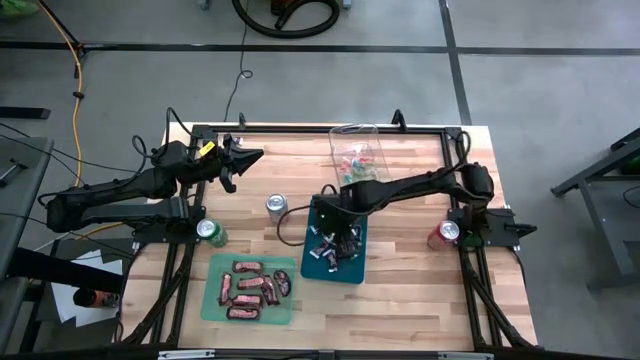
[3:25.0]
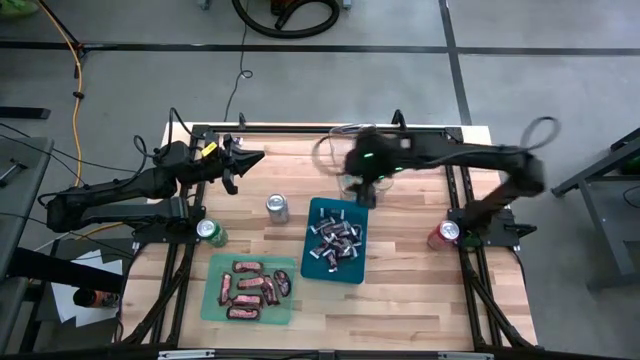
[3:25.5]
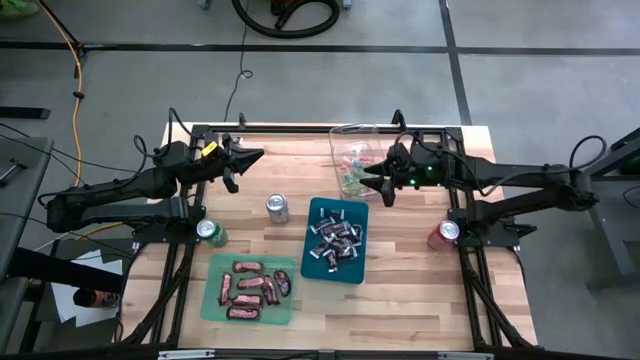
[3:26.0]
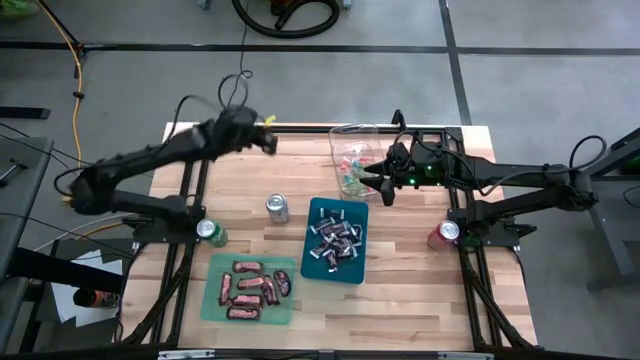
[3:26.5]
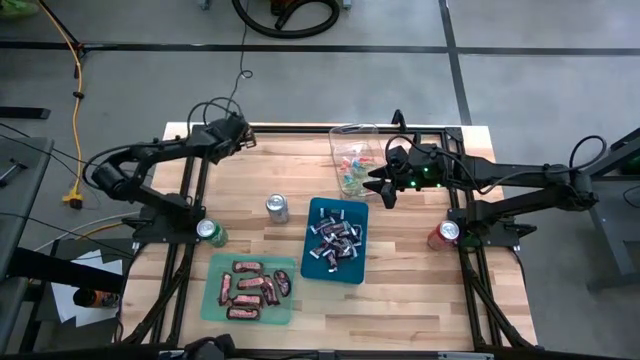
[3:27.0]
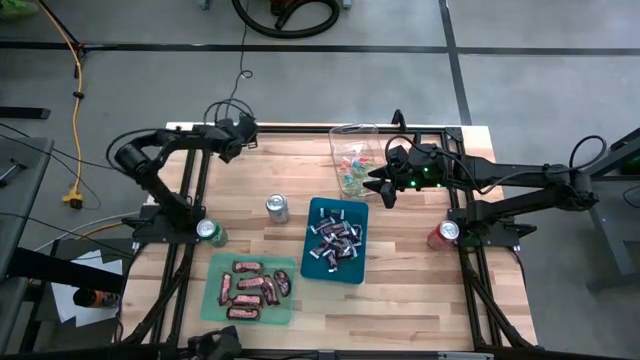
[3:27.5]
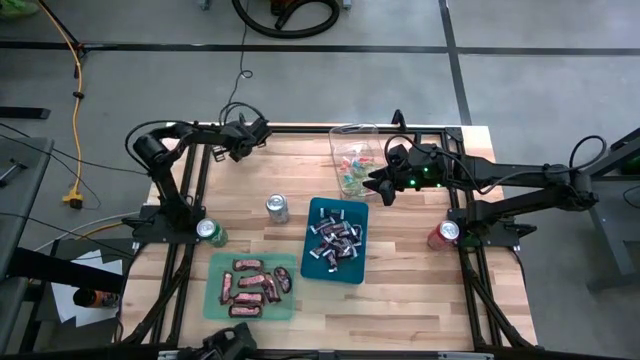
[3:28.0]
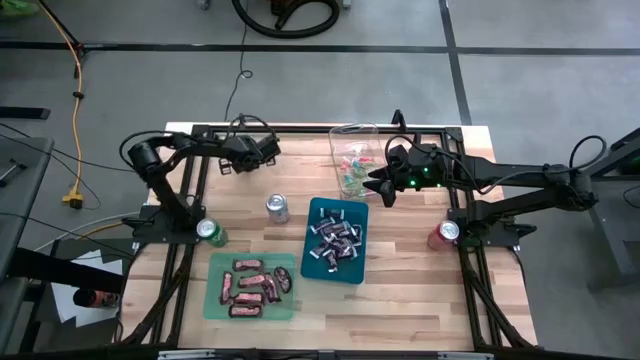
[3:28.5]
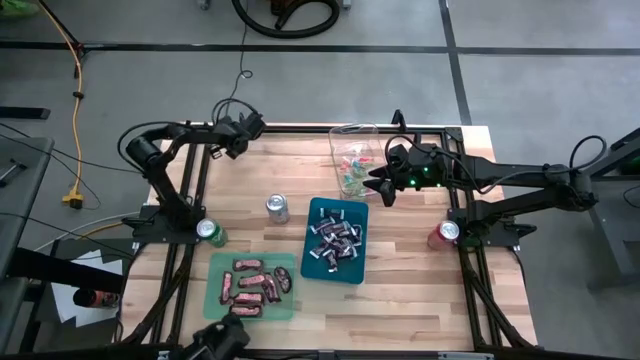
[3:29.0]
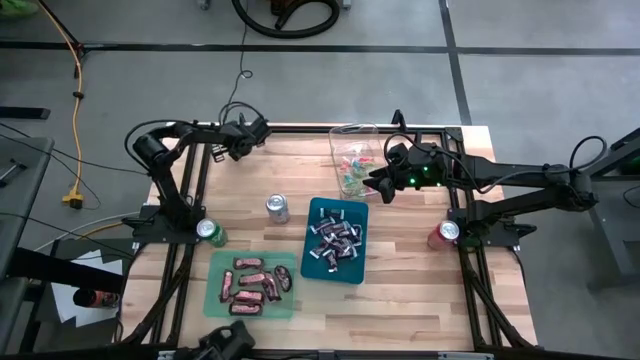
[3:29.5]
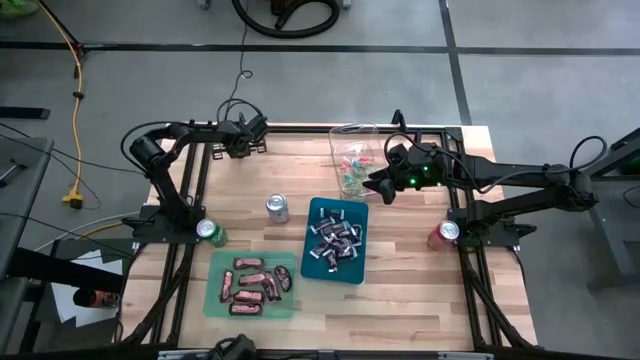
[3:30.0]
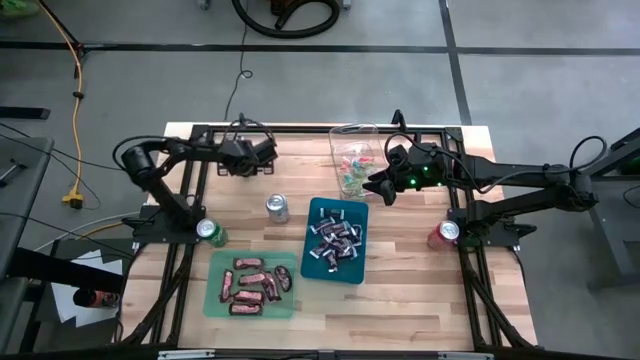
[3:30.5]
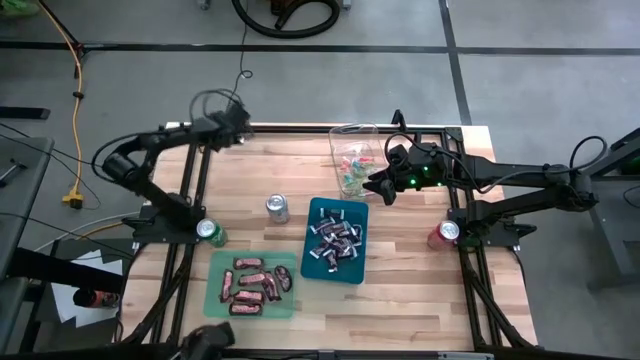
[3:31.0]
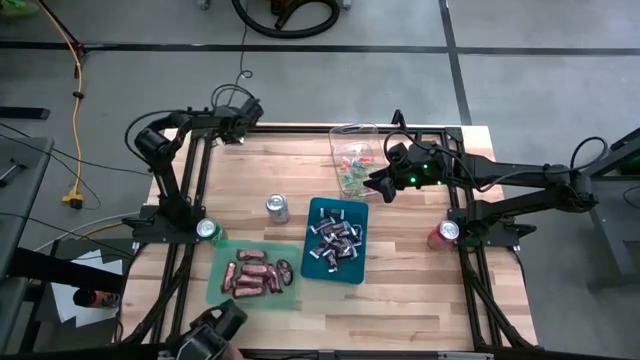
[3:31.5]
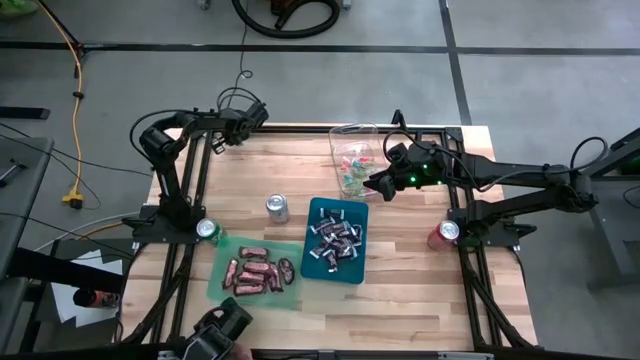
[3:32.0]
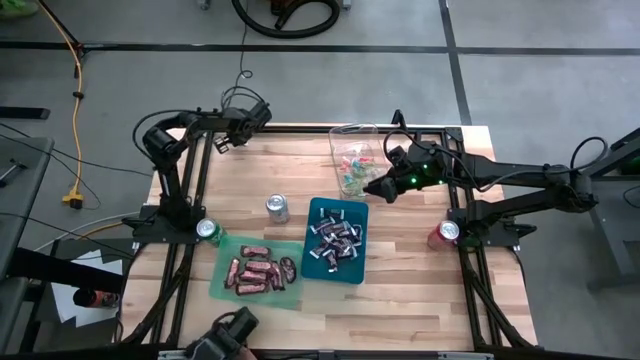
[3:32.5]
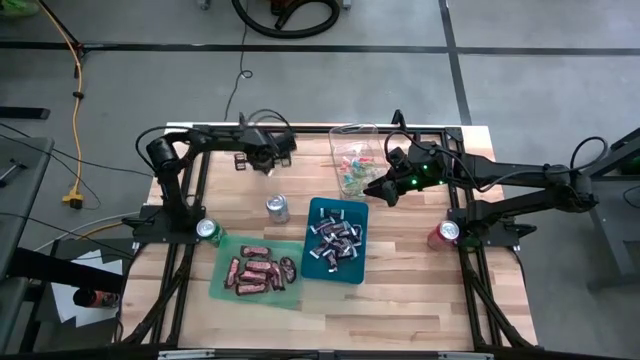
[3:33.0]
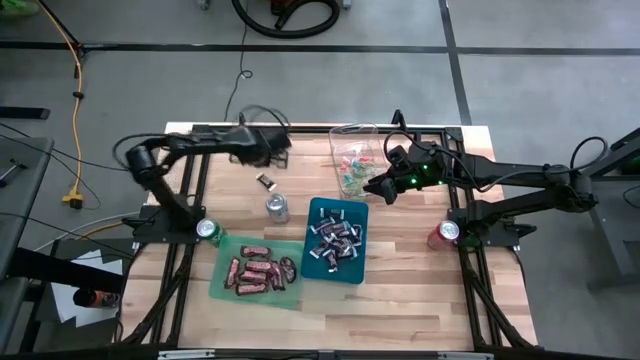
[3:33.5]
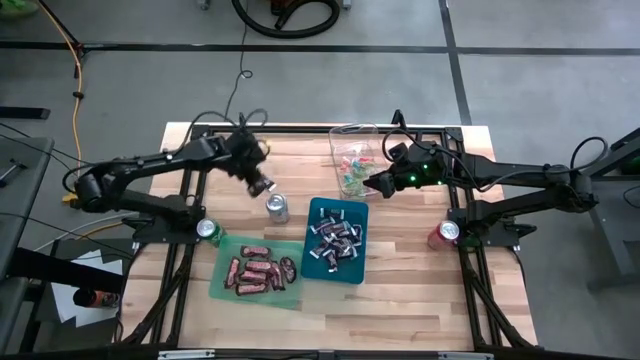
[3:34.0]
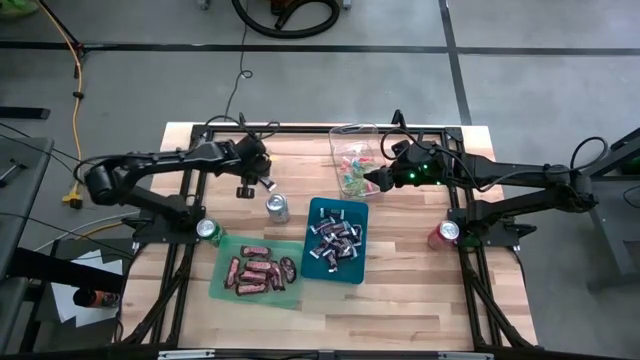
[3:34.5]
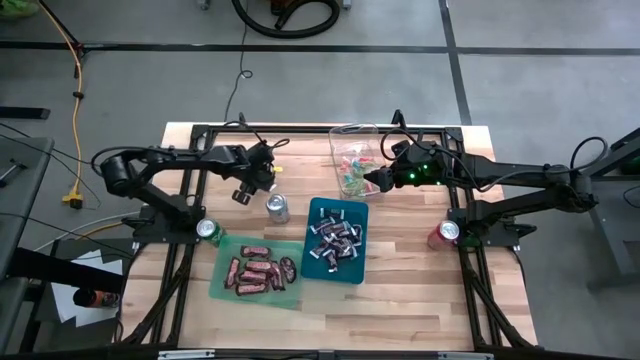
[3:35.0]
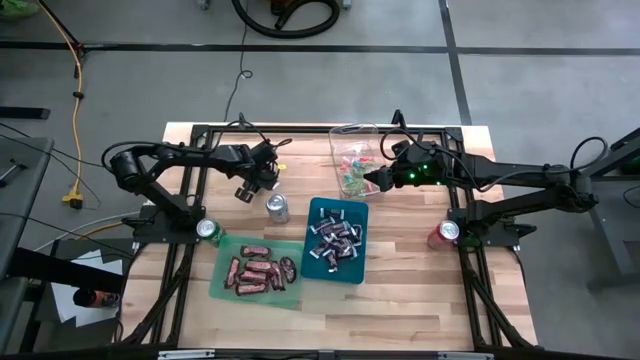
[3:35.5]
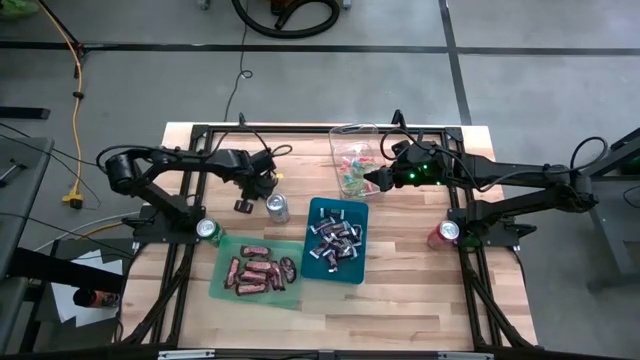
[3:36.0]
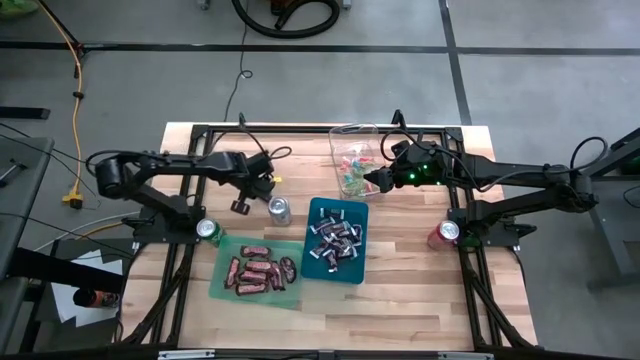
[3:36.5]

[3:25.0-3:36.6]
Task: Sort candy
Put the brown-white chocolate into the blue bin

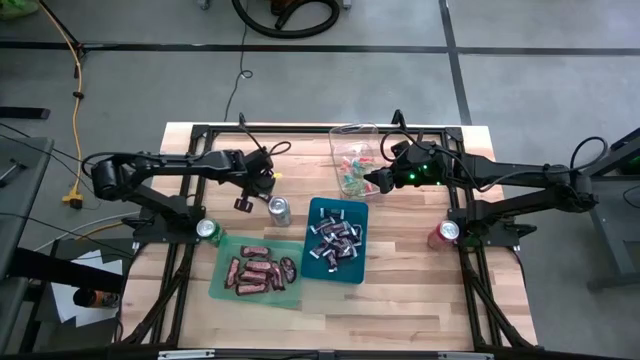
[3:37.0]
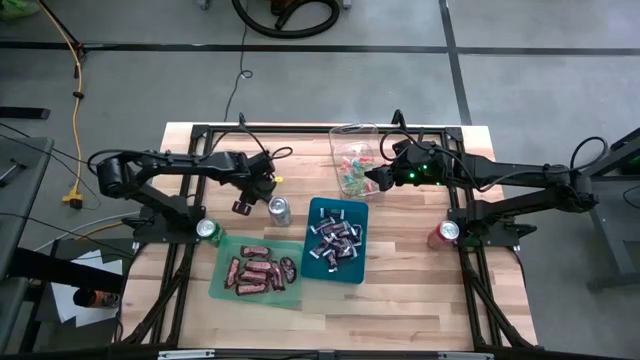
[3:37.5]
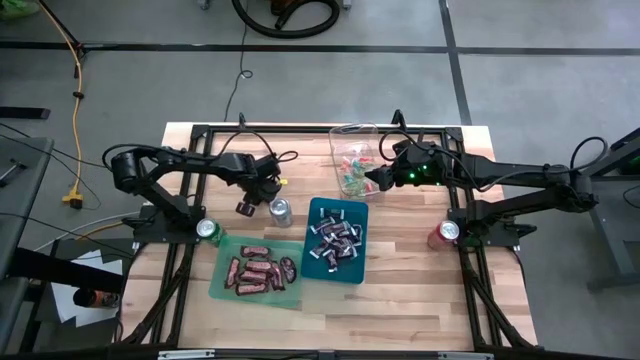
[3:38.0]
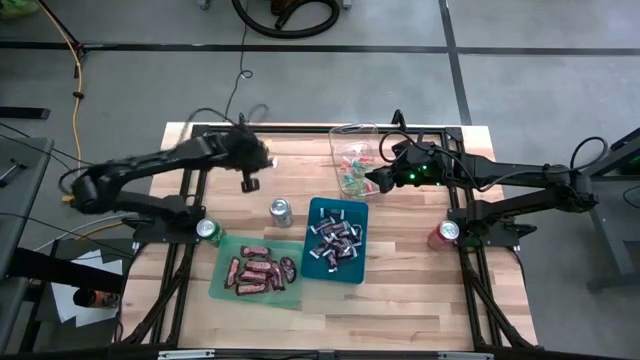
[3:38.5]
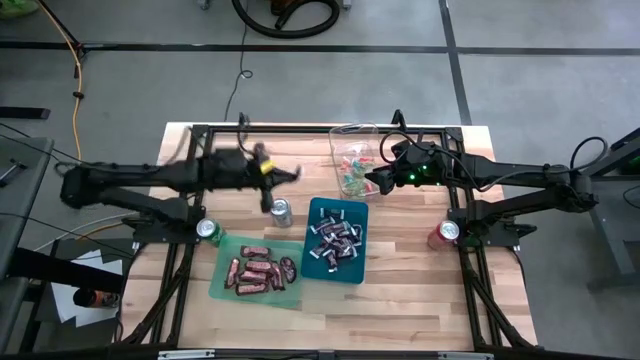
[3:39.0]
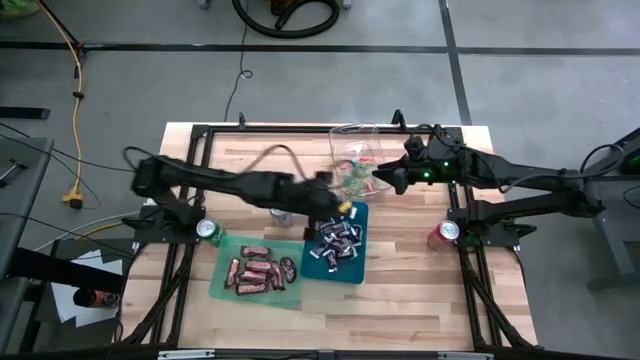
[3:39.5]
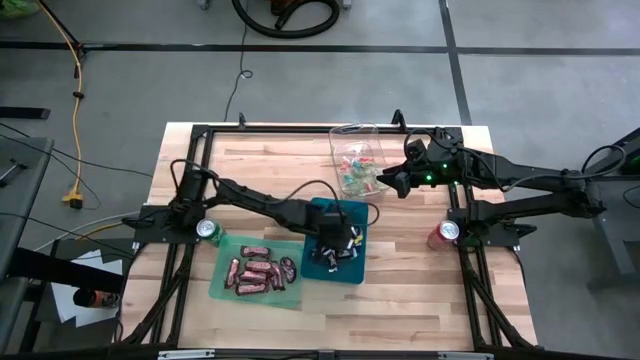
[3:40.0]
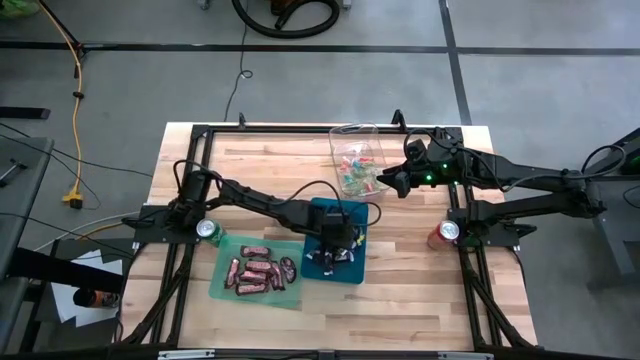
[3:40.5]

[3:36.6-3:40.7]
Put the brown-white chocolate into the blue bin

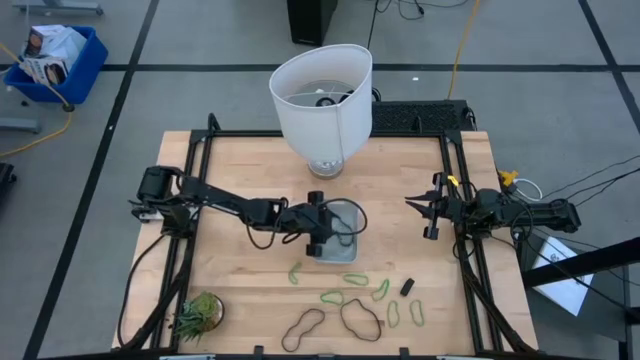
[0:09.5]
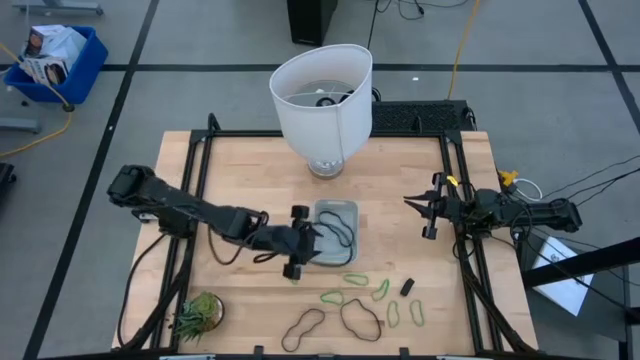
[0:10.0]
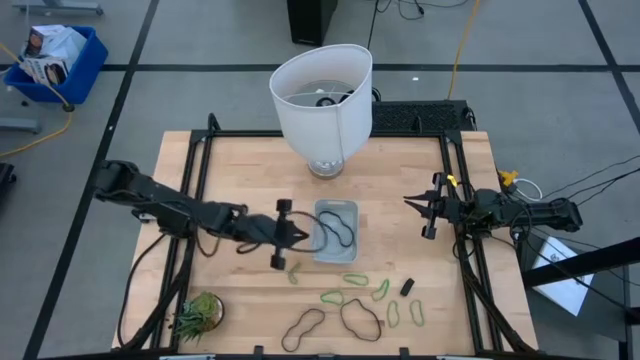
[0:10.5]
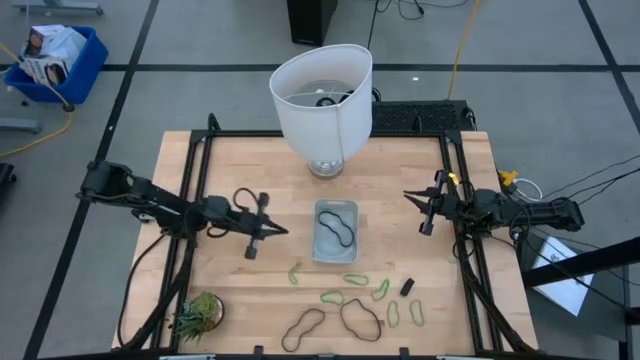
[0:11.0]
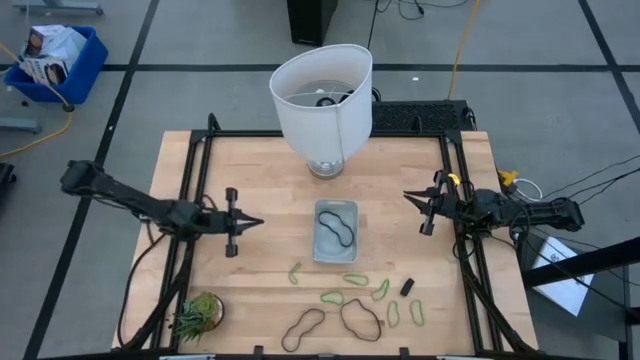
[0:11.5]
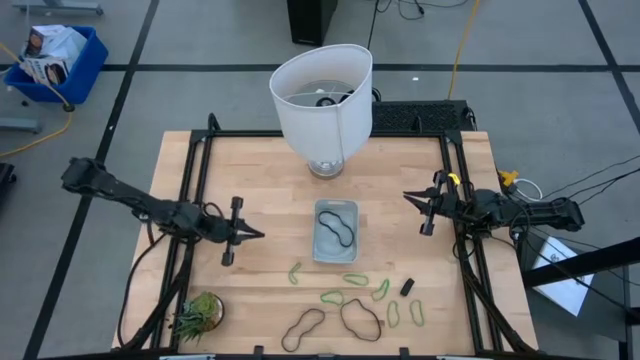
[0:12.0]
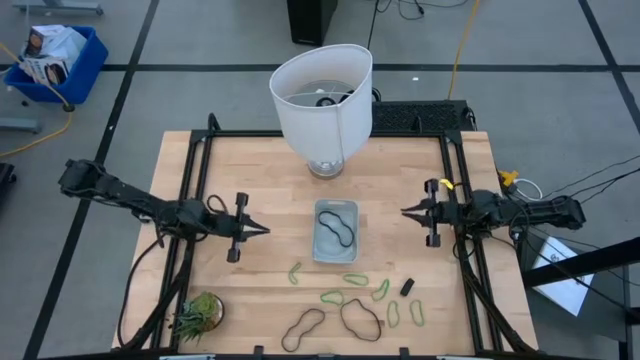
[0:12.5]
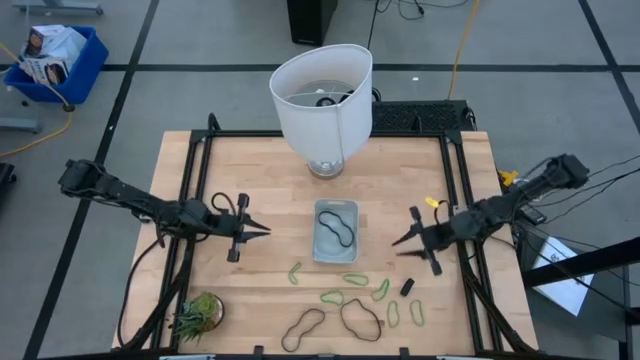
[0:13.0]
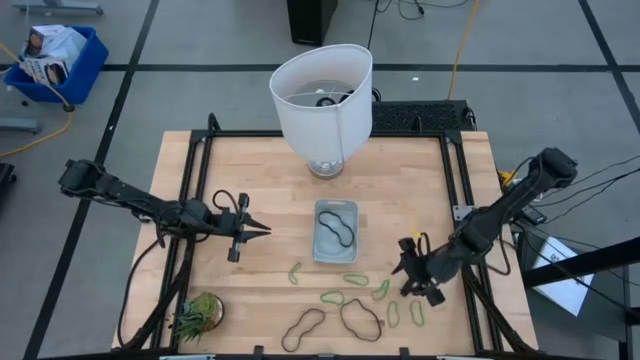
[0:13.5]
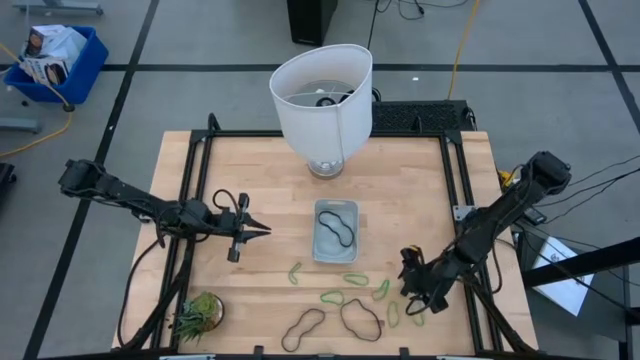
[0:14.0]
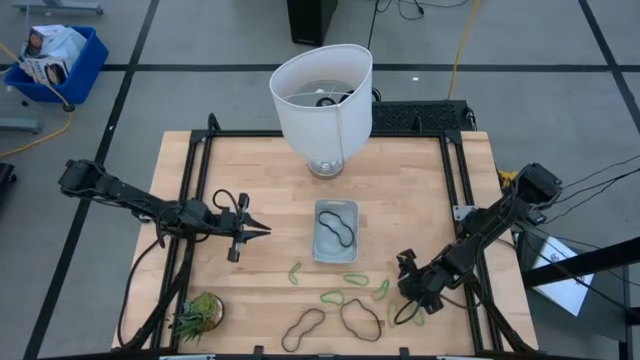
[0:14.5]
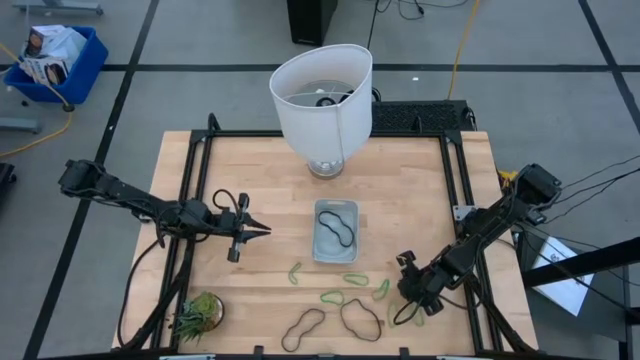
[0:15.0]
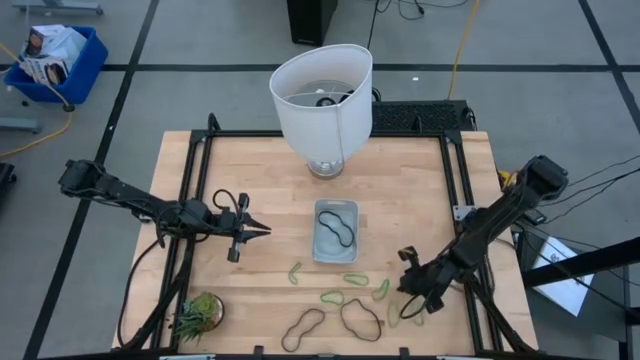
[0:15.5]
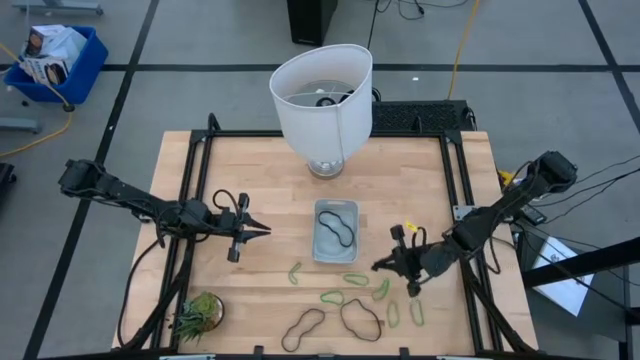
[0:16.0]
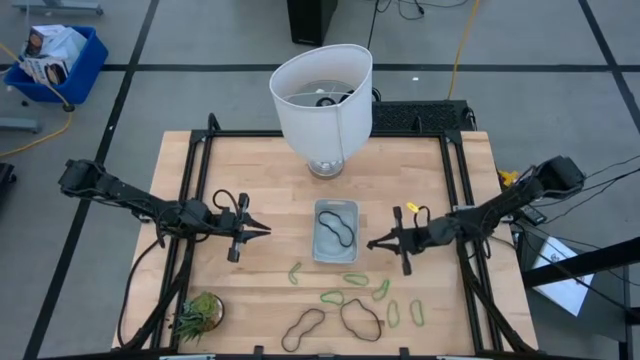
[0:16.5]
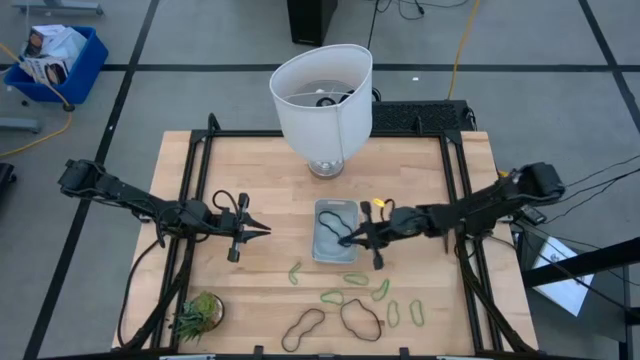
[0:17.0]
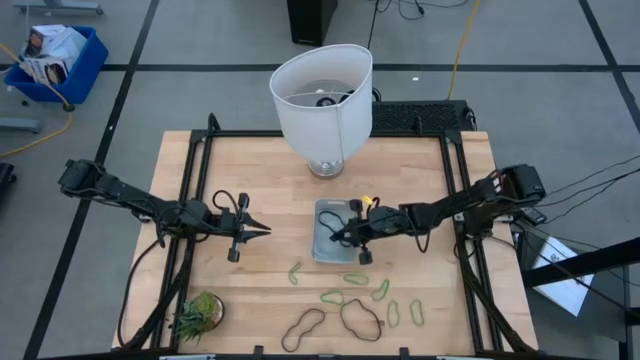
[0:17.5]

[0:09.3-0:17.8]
Task: Pick and place rubber bands into bin
Put the black rubber band into the gray bin
